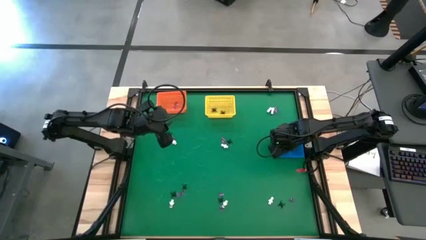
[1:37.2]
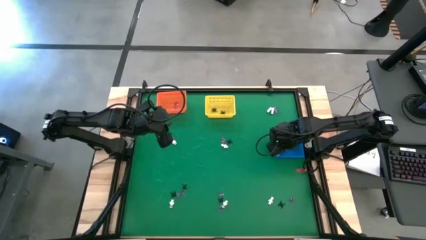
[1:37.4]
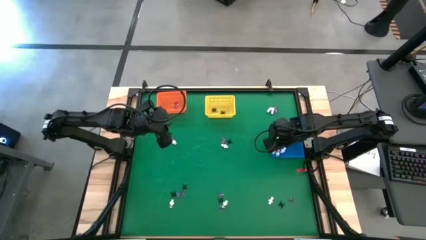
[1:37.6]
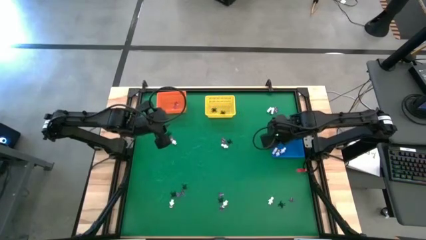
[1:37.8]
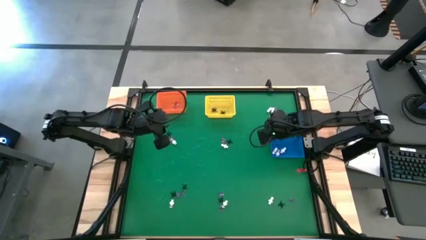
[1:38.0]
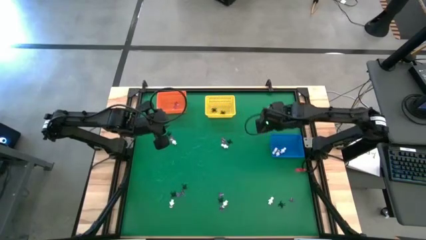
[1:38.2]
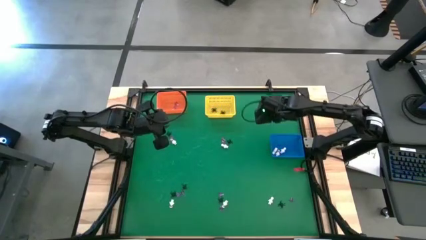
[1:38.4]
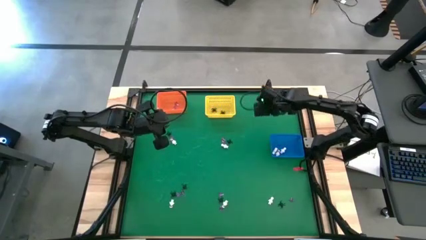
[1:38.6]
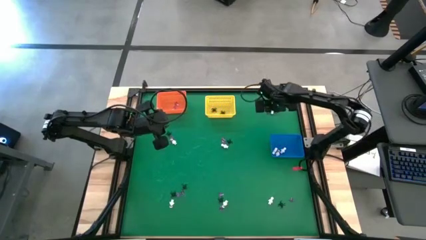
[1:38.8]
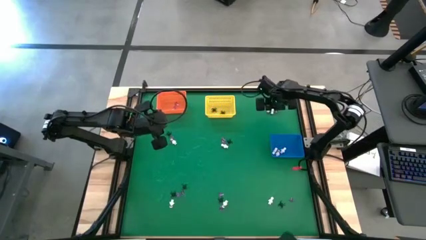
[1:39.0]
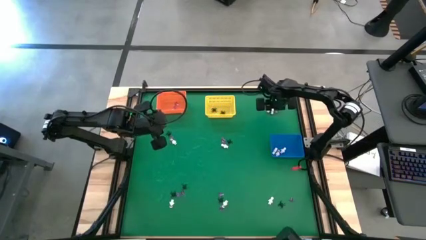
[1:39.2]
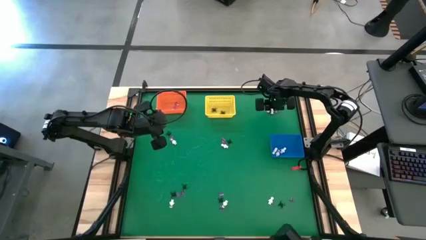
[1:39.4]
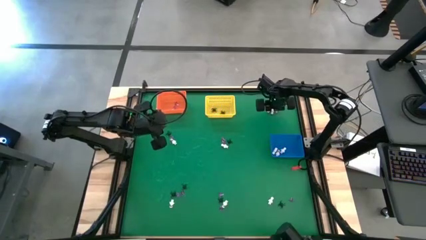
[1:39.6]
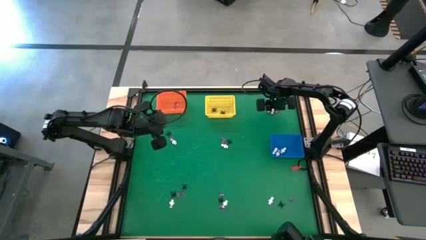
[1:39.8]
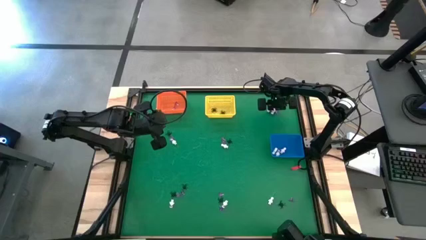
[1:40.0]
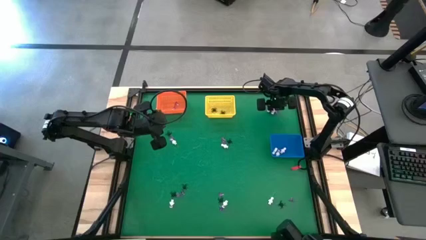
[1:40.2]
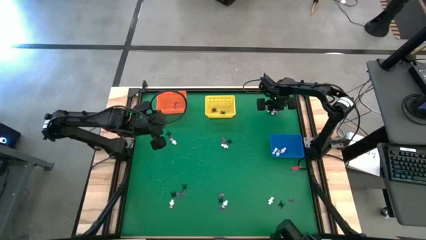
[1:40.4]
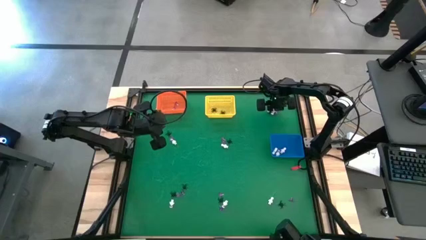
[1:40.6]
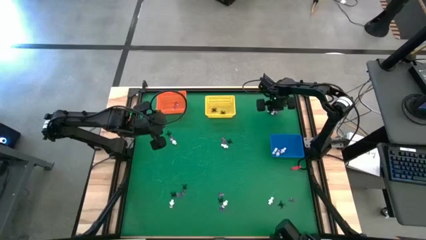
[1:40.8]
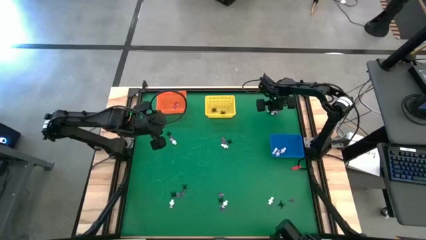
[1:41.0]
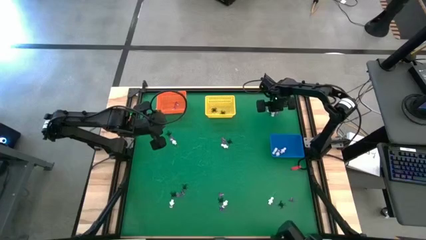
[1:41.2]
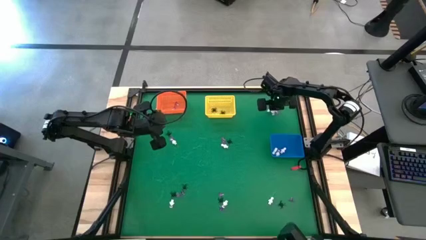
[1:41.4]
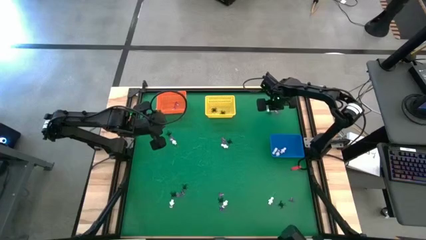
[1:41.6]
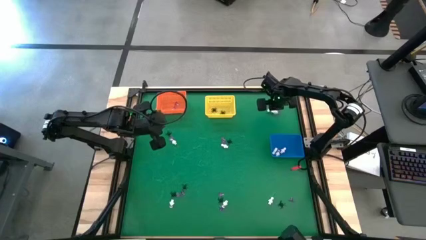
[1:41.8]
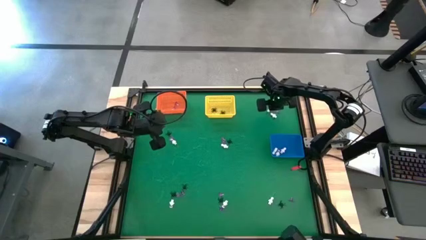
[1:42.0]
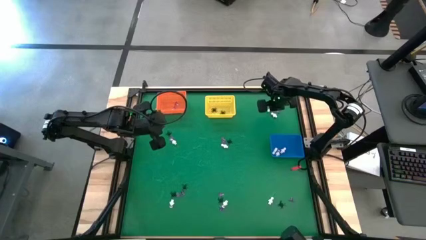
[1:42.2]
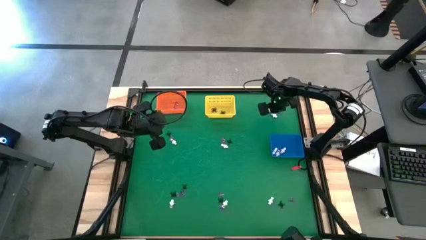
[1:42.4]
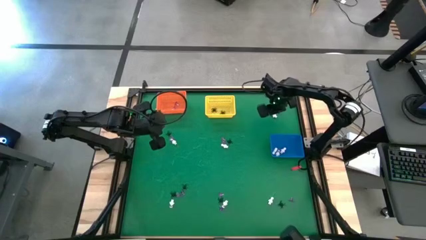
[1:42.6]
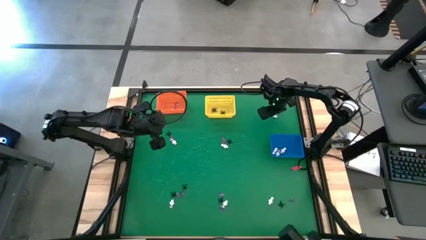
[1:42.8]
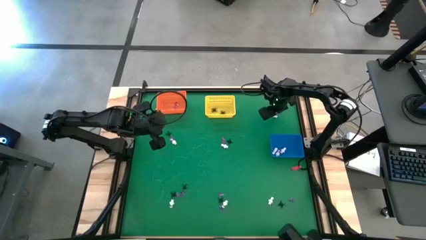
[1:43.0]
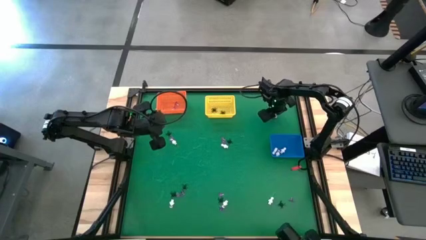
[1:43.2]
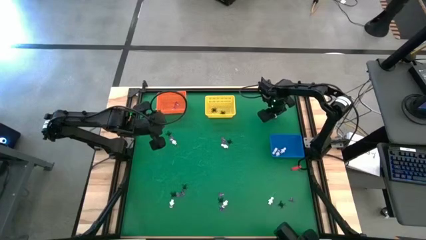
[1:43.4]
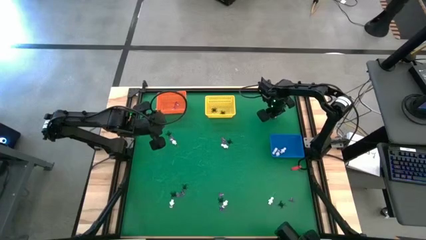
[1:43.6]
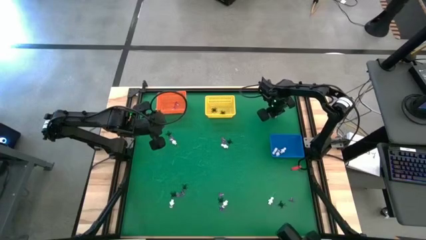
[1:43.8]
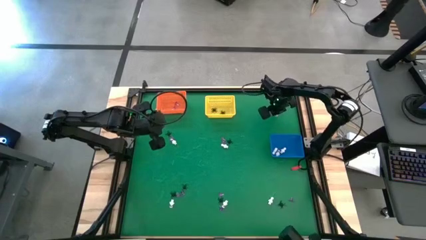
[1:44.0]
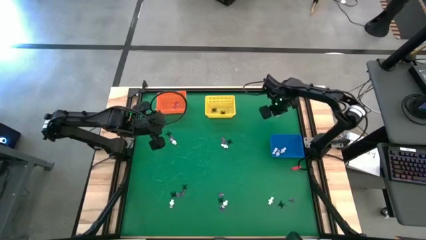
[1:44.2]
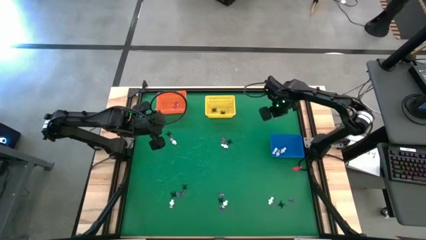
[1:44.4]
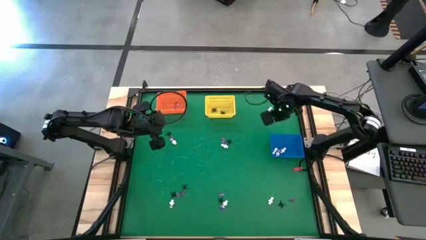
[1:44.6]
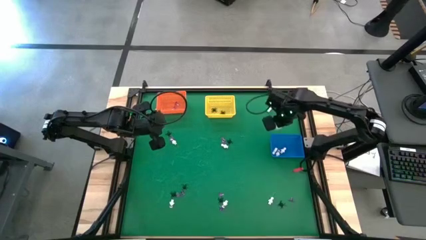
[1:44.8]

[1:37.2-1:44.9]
Task: Sort Halloween decoration
Put the white skeleton toy into the blue basket

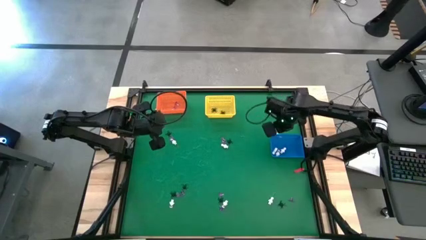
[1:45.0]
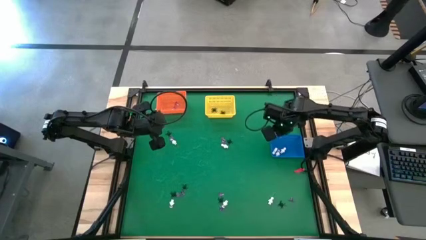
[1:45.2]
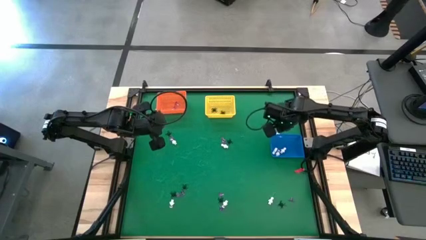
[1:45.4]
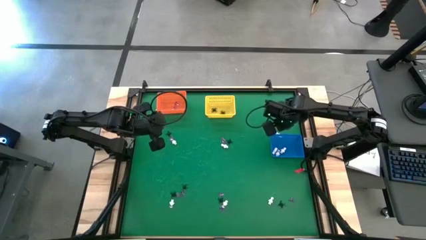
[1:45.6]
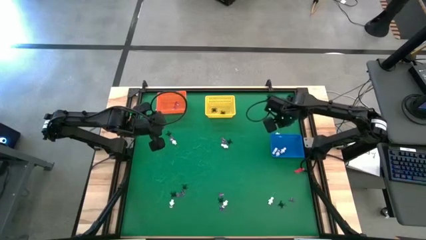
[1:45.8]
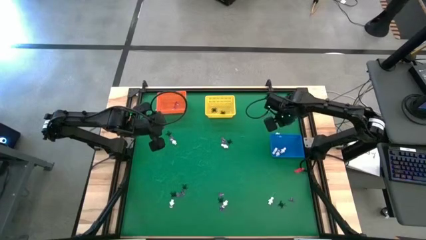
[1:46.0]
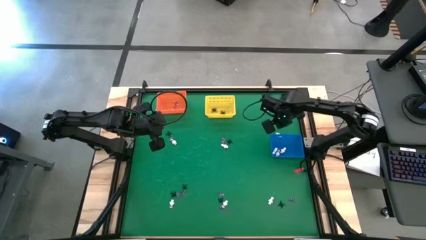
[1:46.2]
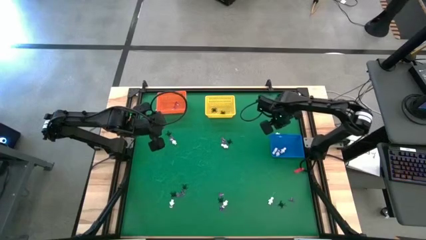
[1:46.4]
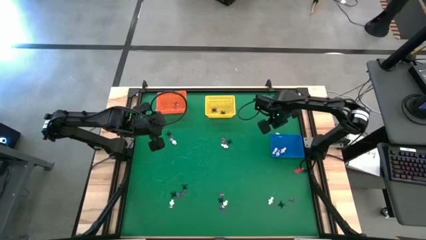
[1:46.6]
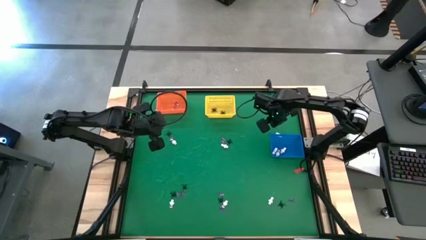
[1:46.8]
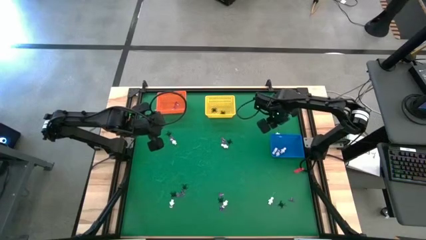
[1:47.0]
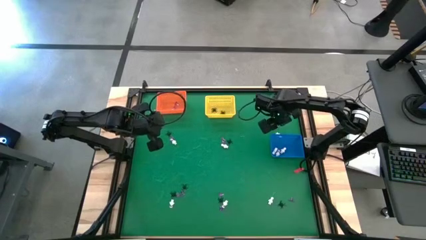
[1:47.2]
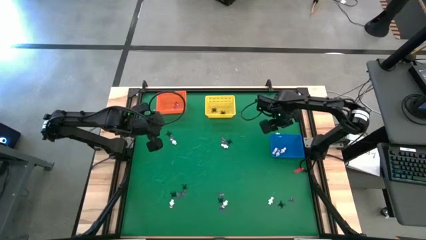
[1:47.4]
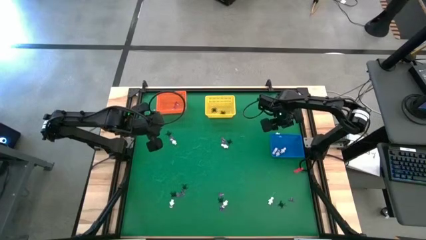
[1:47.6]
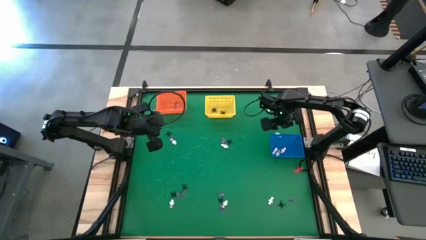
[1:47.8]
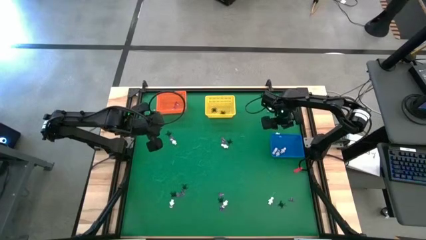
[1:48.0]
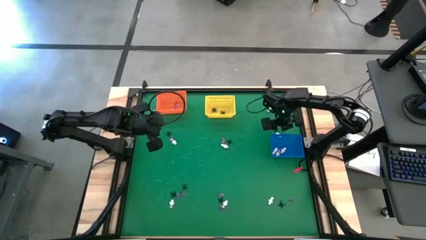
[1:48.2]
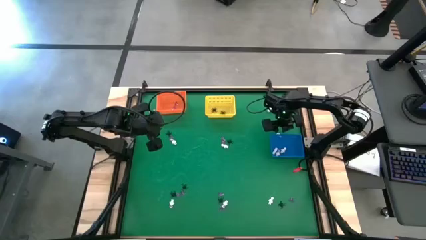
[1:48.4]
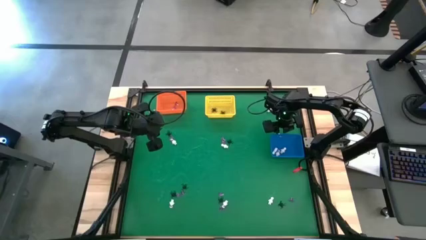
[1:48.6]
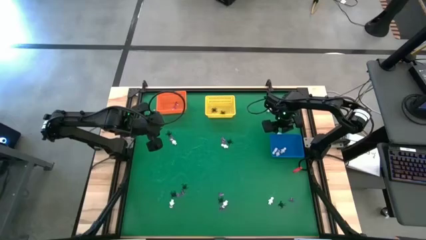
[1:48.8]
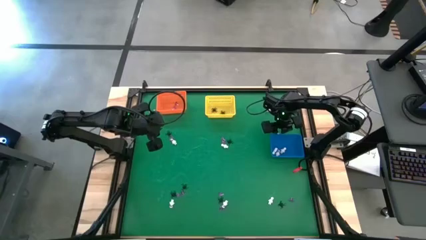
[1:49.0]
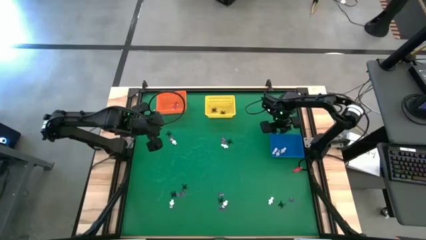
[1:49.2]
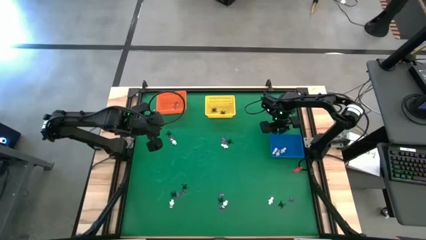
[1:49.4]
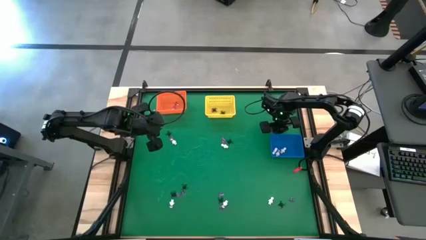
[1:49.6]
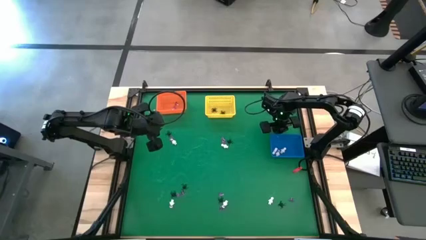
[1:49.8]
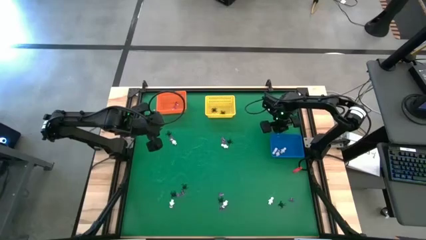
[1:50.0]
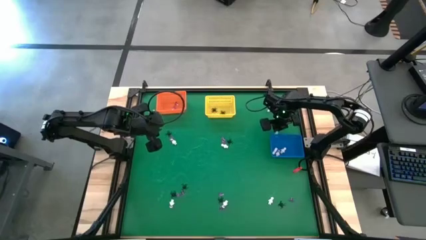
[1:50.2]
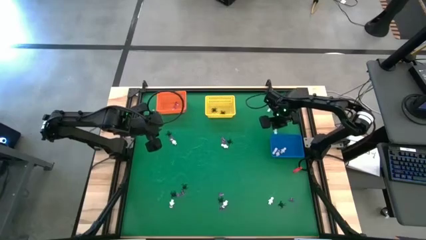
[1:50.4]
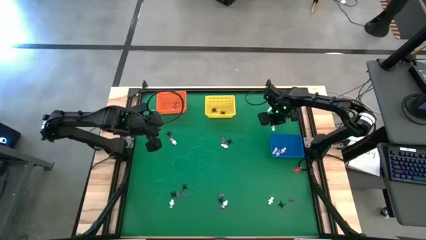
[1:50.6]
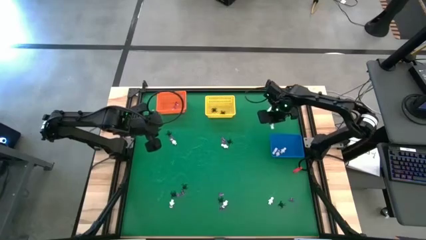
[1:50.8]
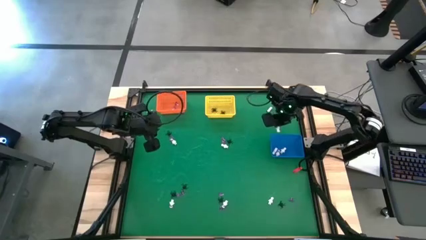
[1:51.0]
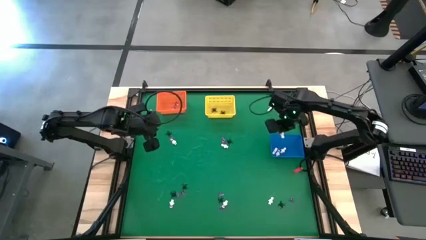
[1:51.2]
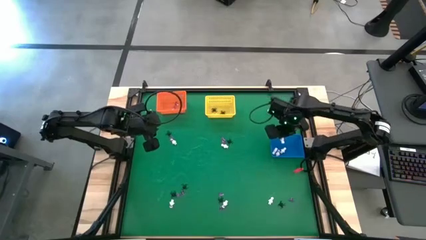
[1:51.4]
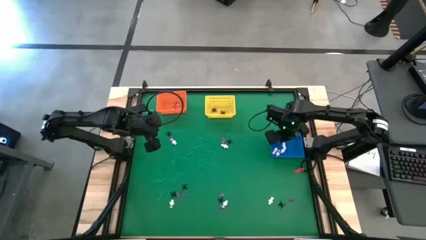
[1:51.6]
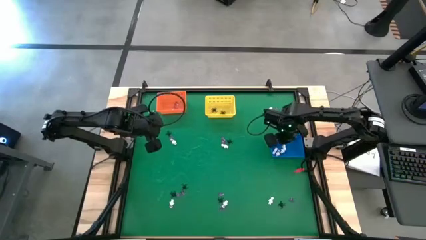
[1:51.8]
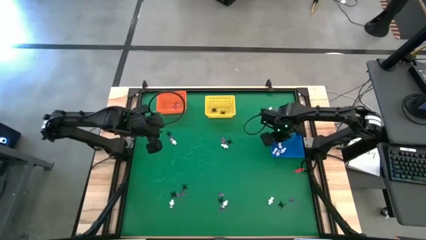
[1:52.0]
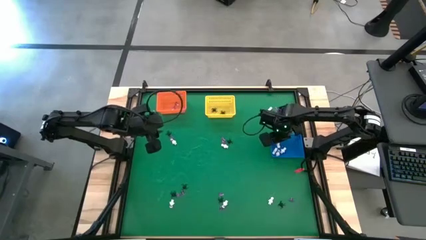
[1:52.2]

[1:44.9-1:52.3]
Put the white skeleton toy into the blue basket

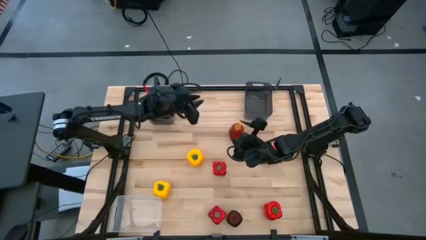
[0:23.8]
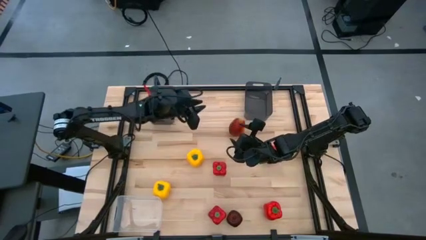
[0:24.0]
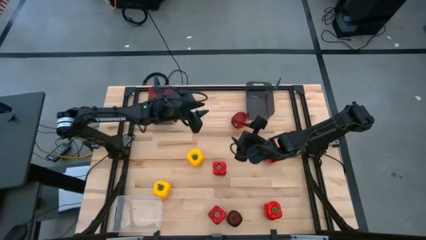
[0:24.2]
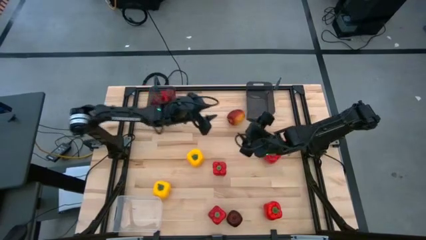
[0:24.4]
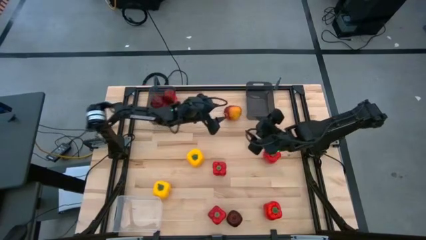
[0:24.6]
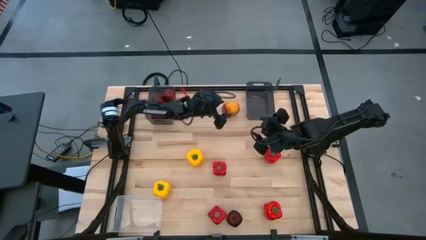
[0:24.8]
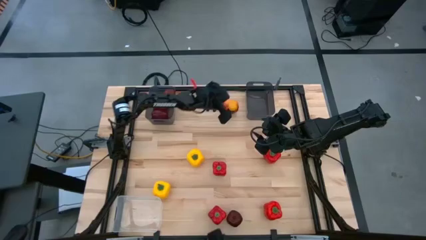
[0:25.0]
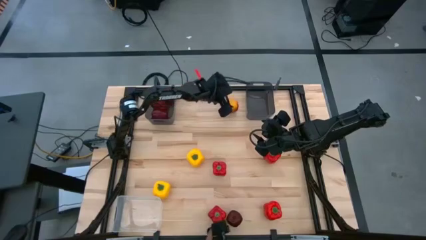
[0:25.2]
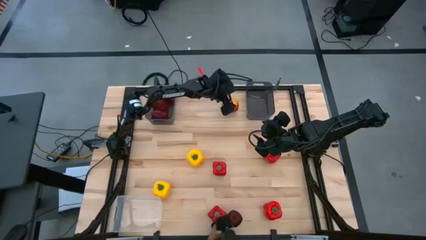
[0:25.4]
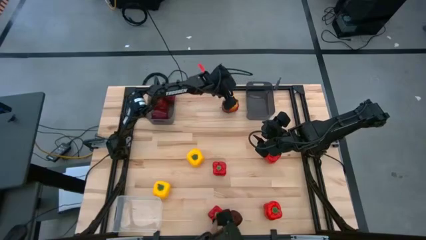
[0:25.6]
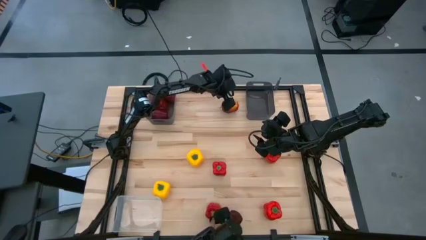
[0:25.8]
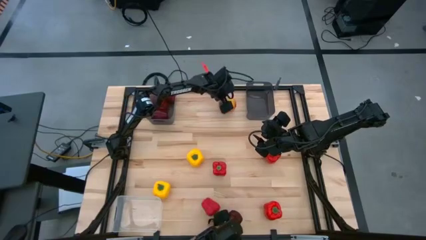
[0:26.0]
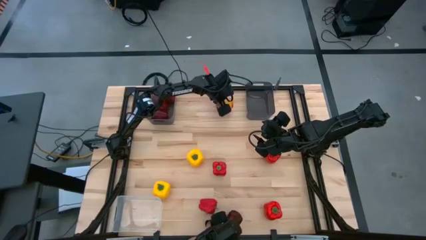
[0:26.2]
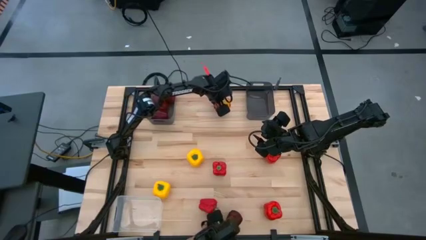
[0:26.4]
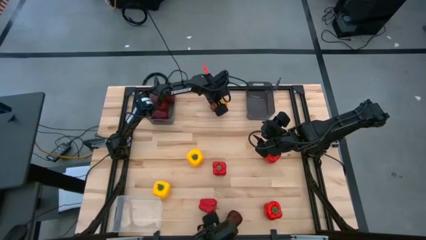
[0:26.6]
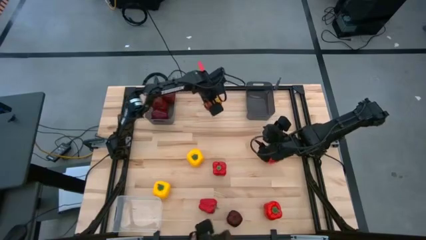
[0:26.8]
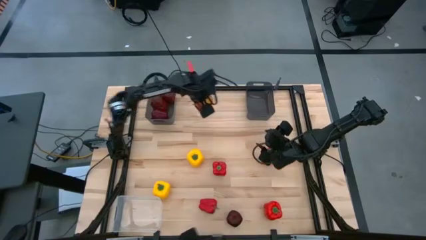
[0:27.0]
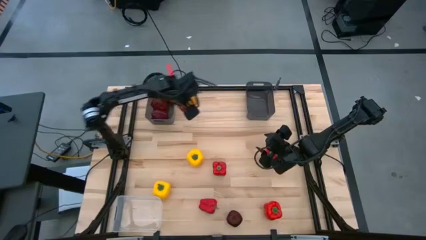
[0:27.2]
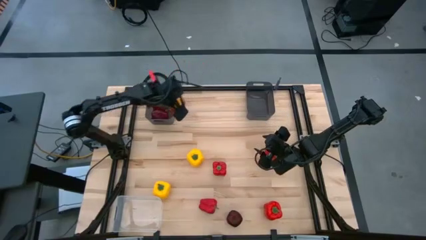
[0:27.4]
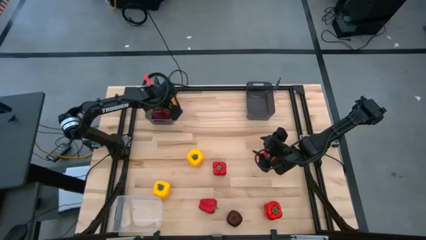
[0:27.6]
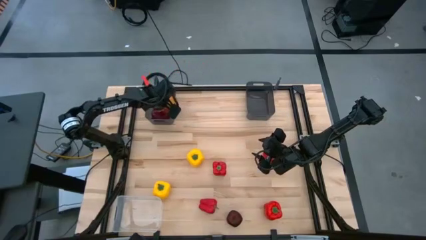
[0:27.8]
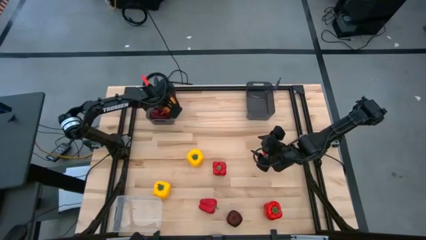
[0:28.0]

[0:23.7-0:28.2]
Task: Sort produce into baskets
Put the red apple into the left black bin
